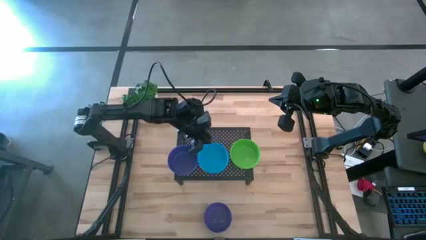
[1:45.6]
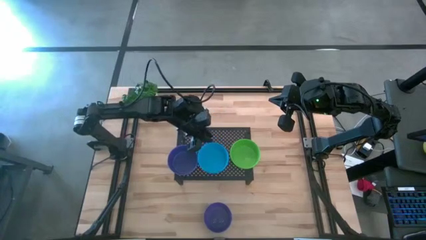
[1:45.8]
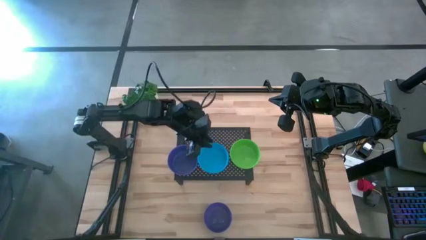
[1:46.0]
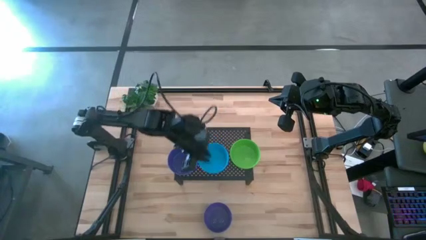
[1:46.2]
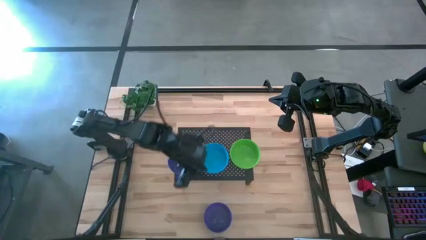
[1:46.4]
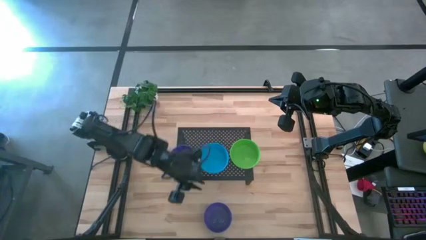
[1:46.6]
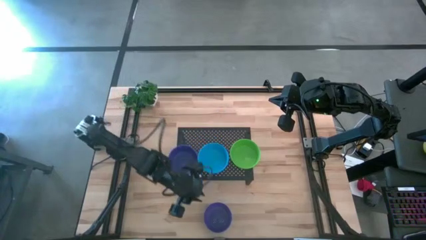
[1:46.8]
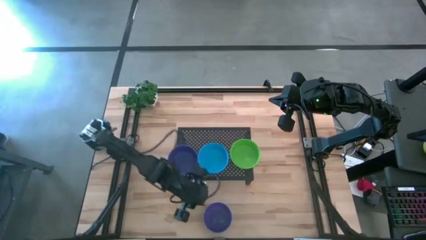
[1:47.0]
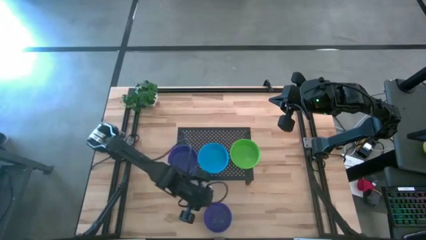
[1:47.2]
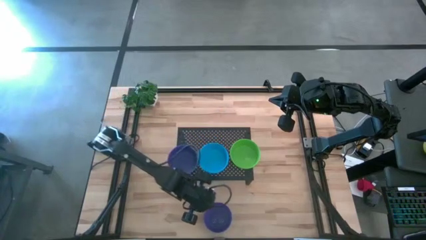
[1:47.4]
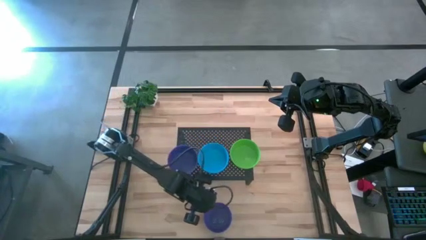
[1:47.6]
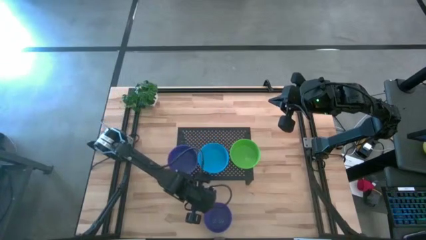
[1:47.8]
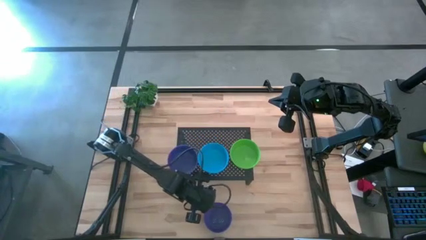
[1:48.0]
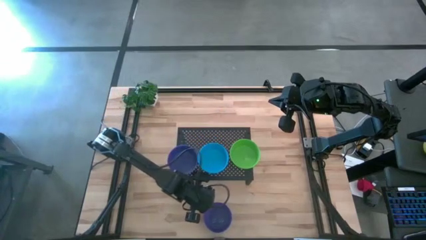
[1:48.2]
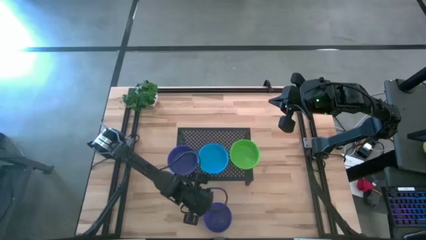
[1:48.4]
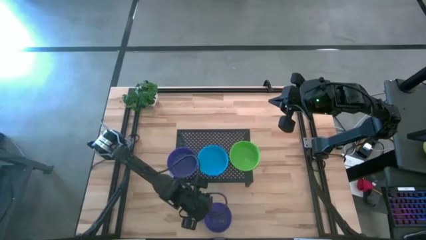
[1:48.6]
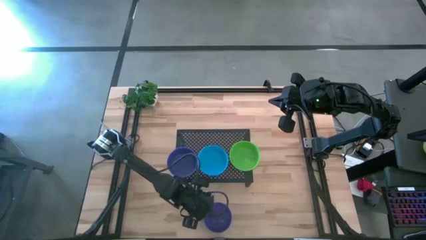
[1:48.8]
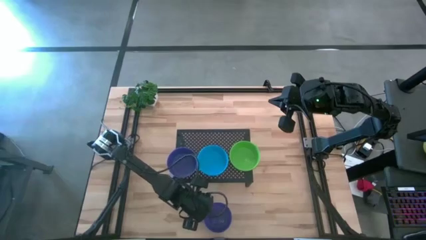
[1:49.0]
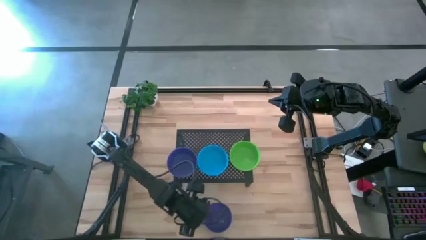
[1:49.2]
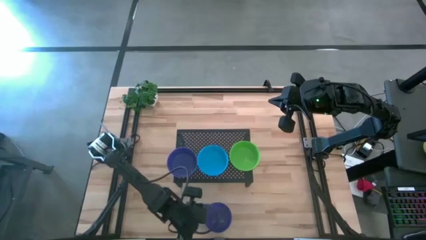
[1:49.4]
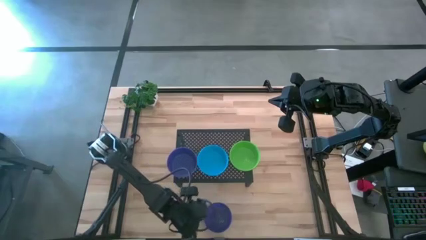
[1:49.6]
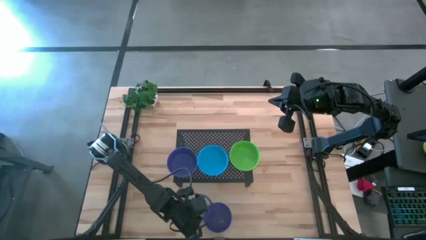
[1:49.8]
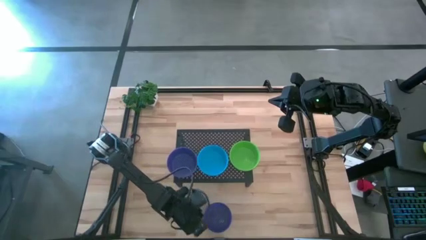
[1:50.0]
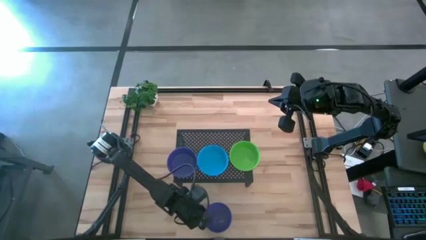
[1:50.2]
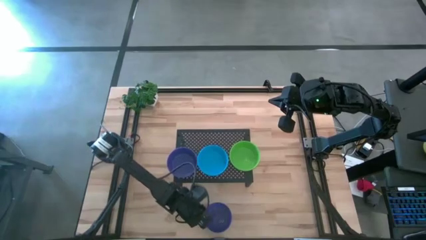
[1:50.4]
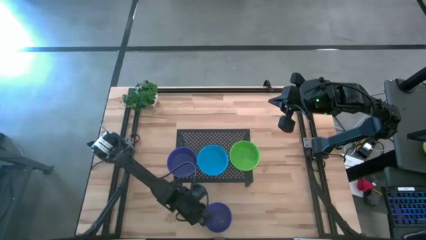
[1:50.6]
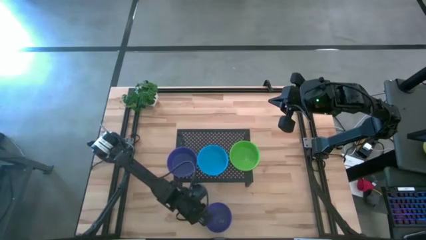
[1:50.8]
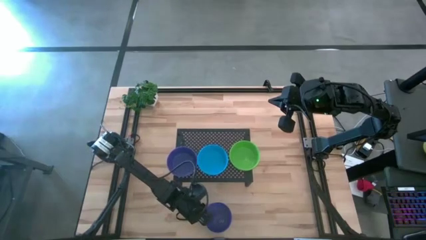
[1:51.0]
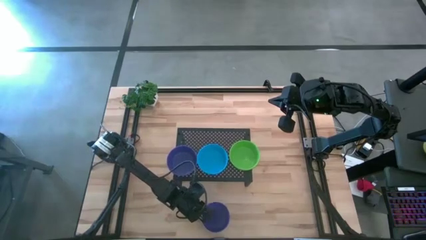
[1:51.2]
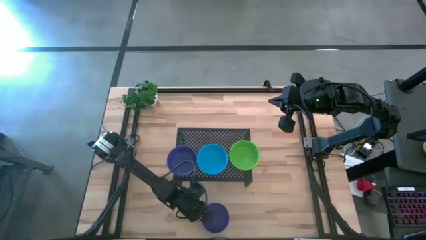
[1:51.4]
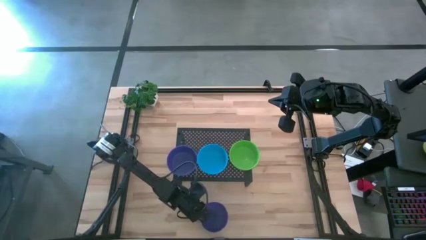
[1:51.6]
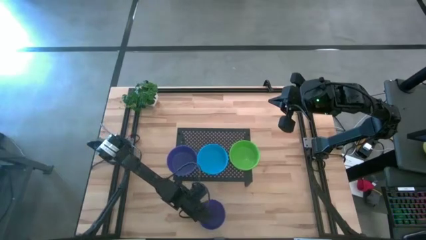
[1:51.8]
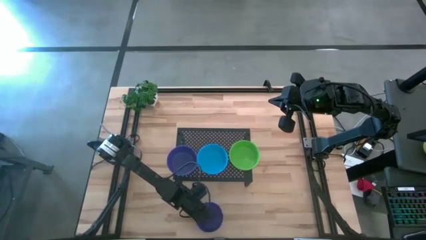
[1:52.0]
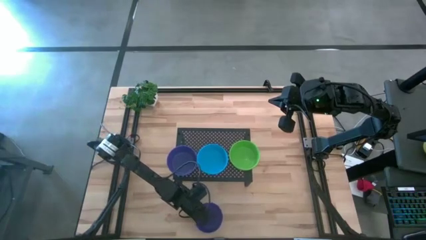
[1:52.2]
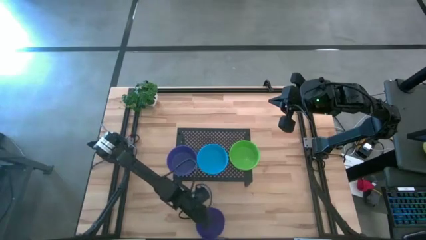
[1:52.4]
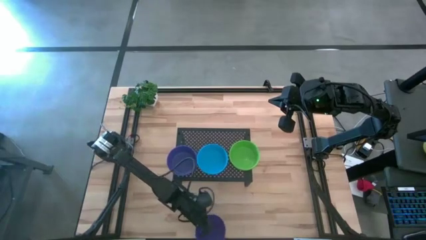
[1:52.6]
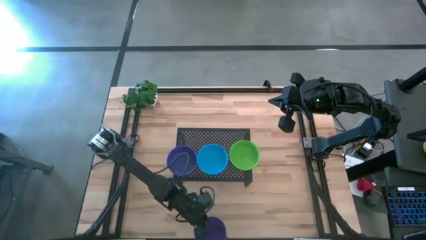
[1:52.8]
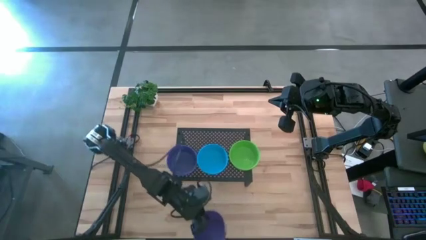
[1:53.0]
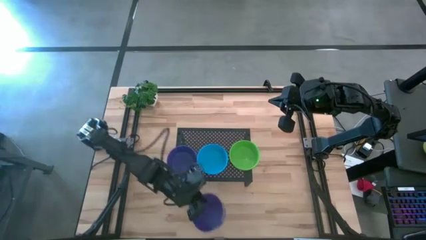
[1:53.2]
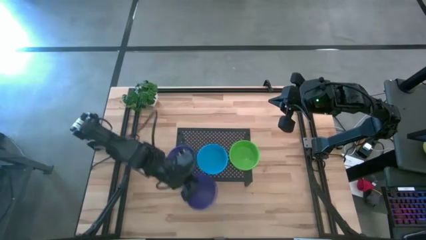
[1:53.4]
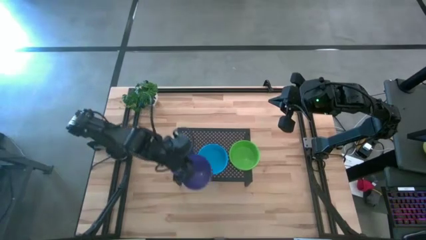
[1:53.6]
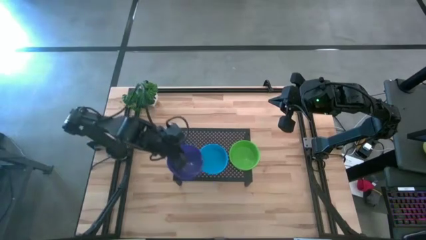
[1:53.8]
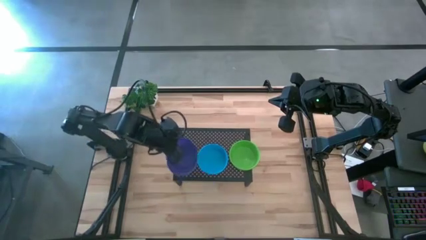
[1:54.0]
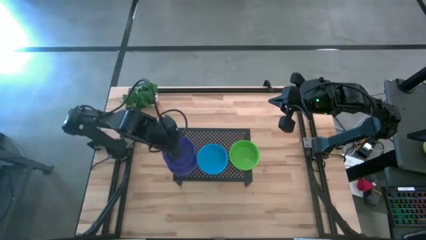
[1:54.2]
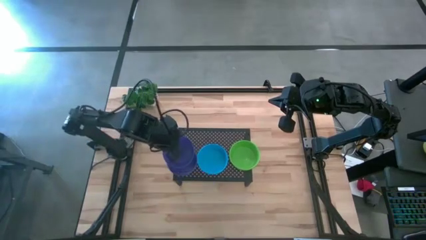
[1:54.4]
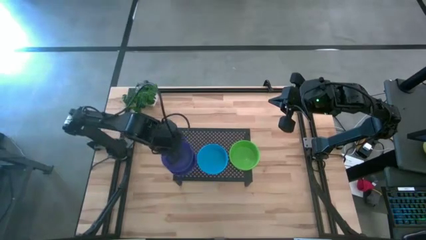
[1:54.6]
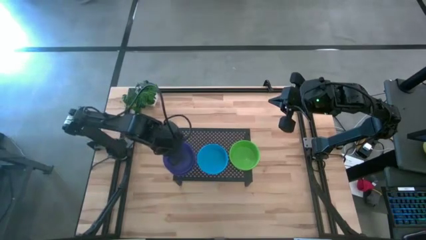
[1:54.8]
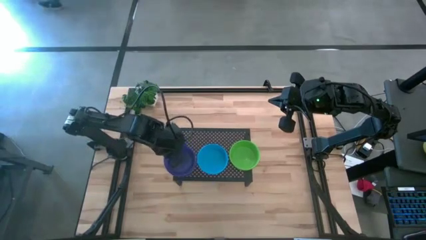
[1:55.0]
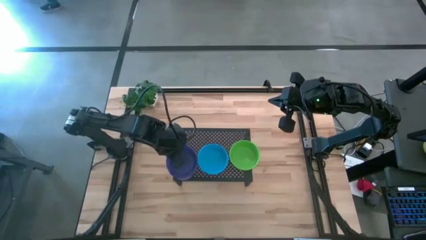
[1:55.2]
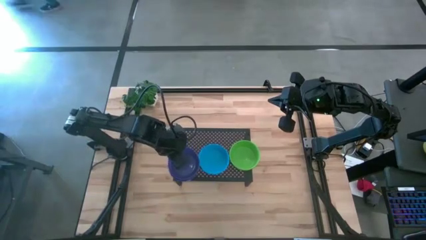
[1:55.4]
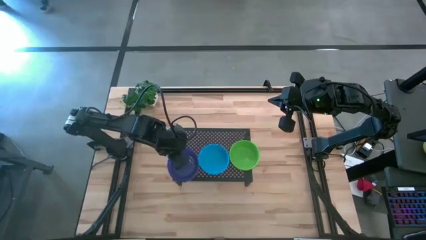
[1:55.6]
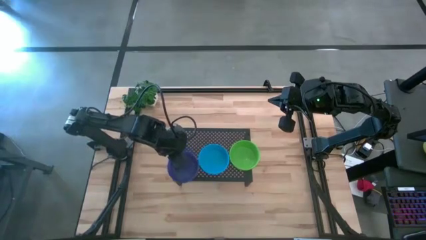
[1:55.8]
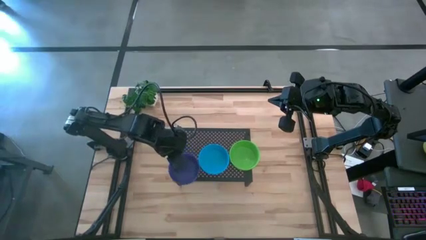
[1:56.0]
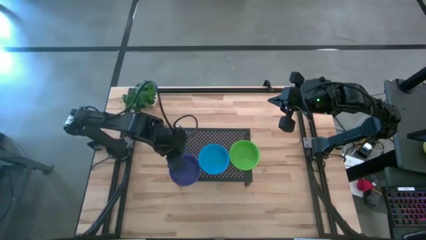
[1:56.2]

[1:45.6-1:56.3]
Task: Pick & Place Mini bowls
Stack the violet bowl on the violet bowl on the shelf

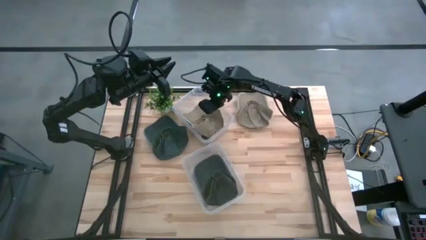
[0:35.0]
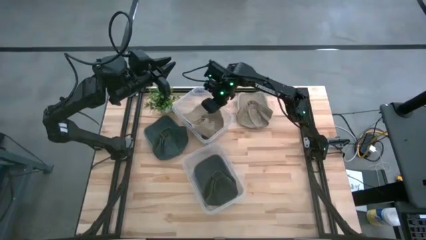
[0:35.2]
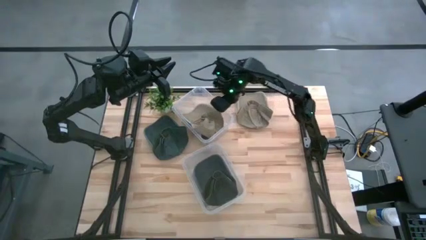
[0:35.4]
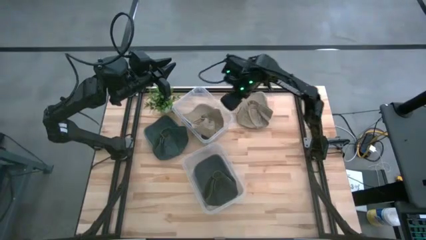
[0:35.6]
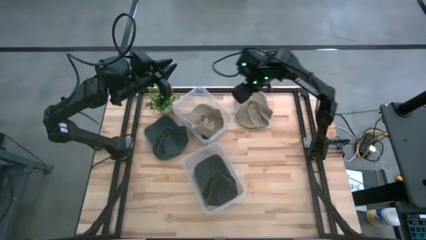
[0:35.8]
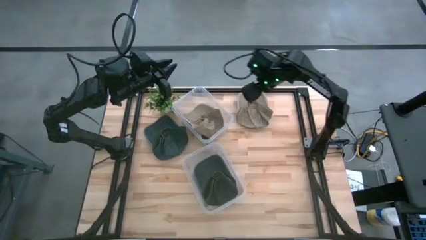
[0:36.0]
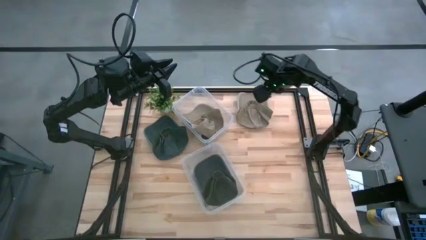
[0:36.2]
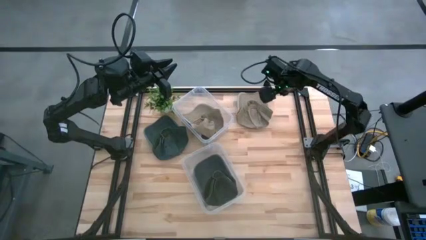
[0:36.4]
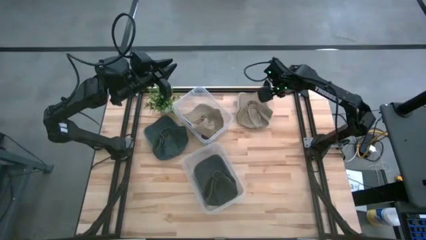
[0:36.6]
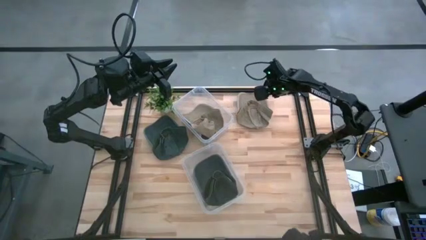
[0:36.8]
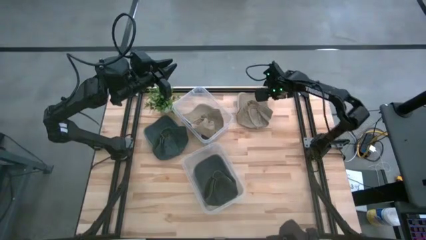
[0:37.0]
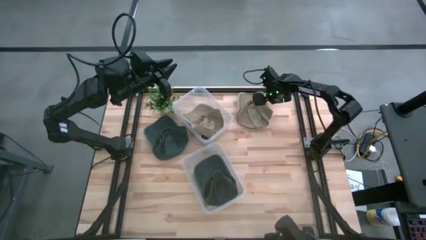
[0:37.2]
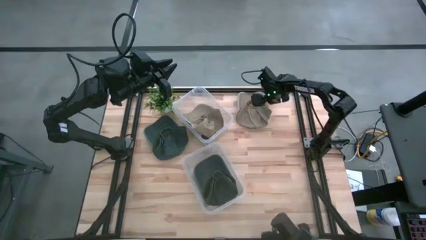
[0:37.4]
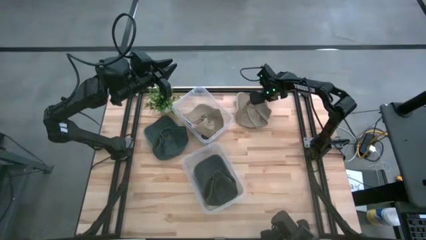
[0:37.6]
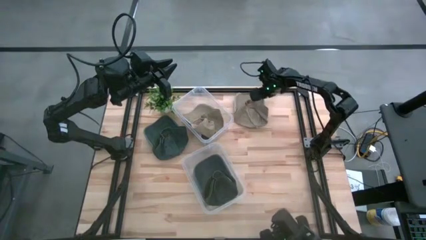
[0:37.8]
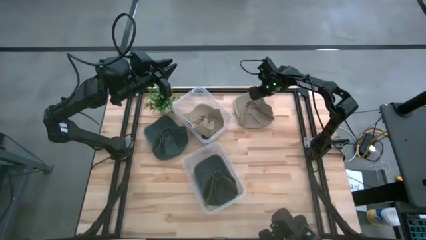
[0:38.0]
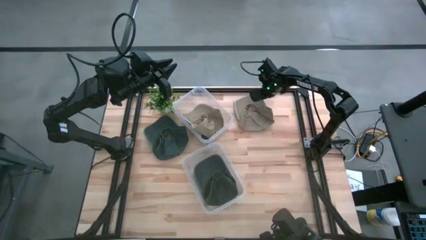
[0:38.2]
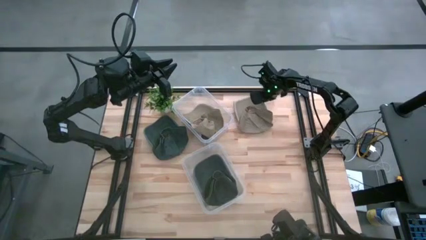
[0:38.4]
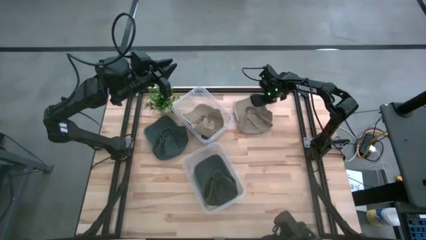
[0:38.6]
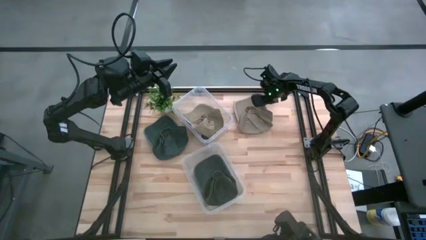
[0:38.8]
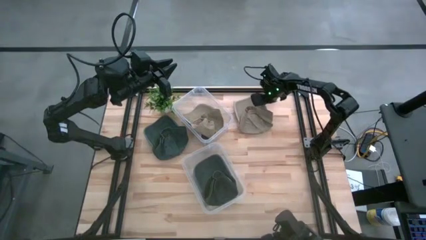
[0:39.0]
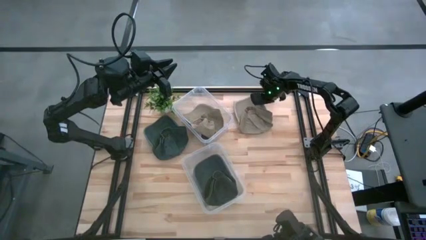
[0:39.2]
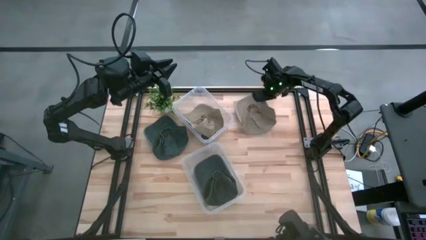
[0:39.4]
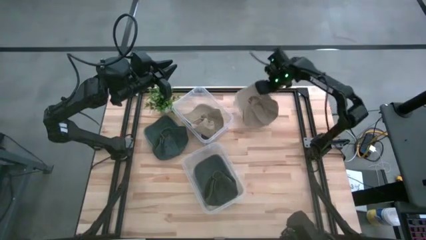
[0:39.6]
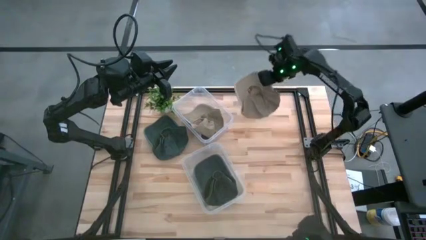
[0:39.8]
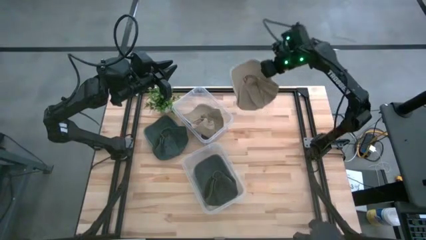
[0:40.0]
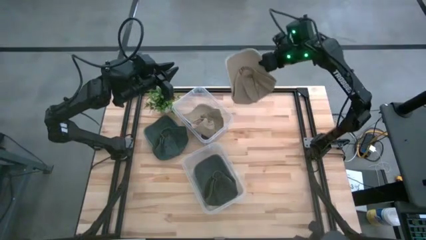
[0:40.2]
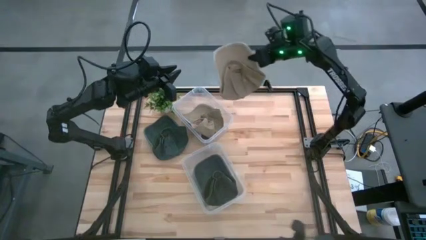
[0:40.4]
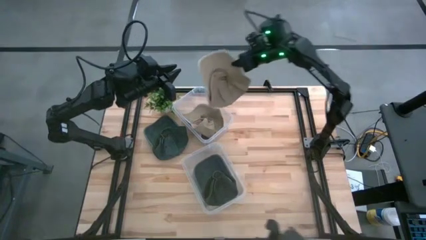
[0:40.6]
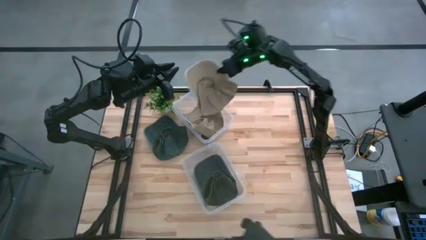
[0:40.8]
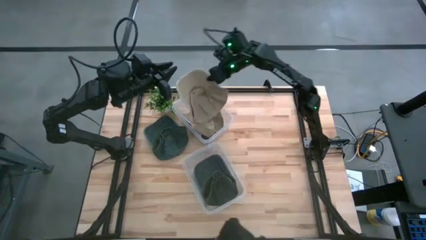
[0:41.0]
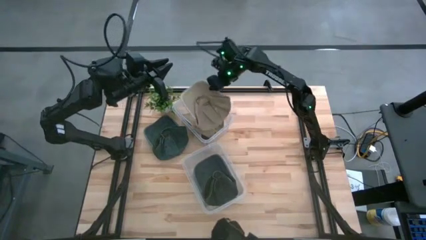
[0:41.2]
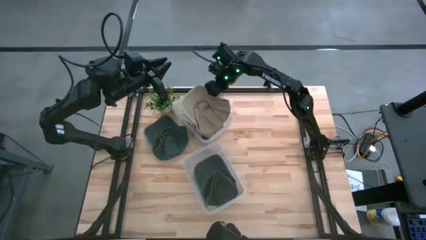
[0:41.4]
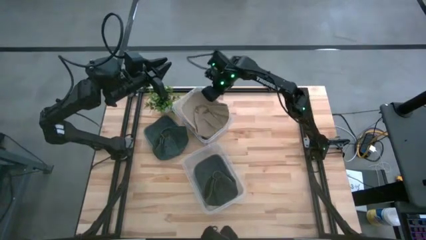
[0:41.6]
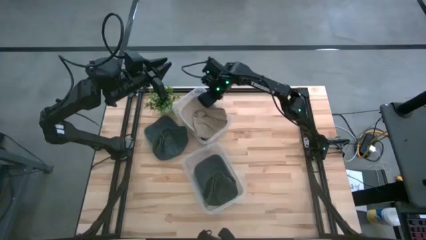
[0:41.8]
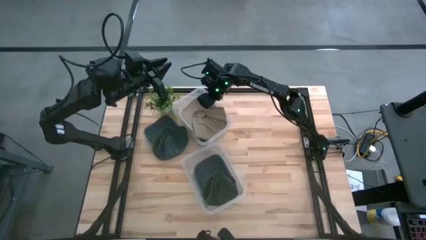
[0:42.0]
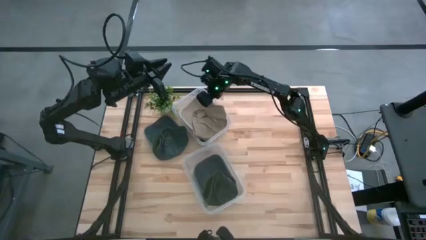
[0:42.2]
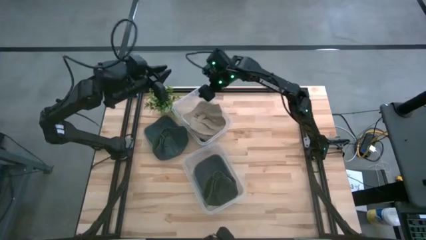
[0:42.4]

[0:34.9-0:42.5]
Task: Pick & Place hat
Put the brown cap into the top transparent bin
